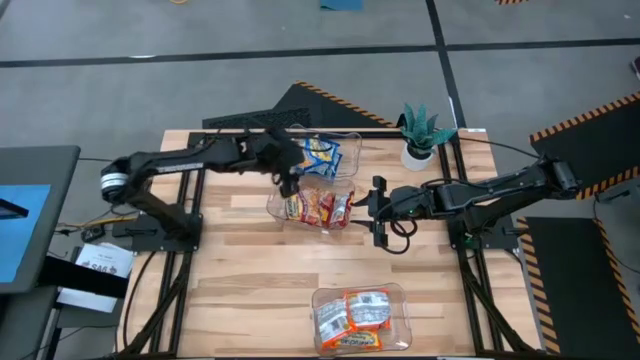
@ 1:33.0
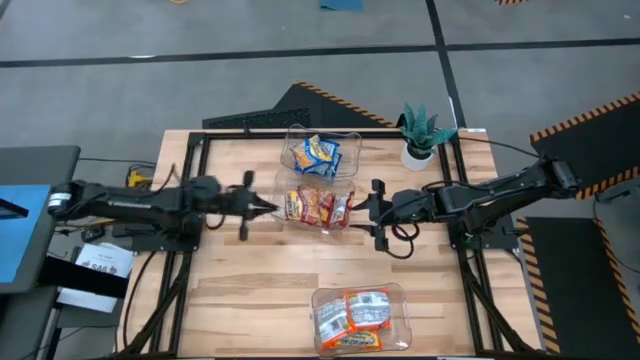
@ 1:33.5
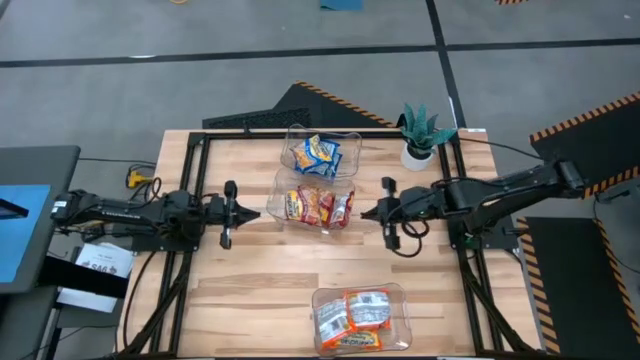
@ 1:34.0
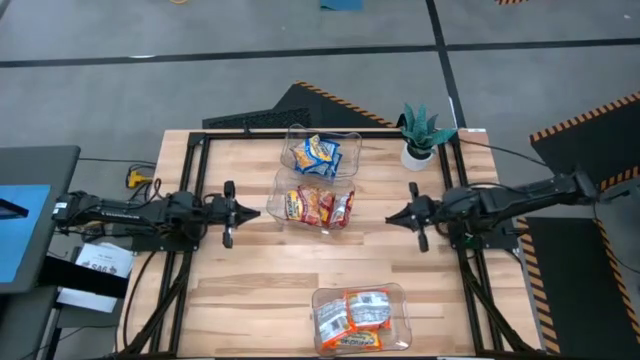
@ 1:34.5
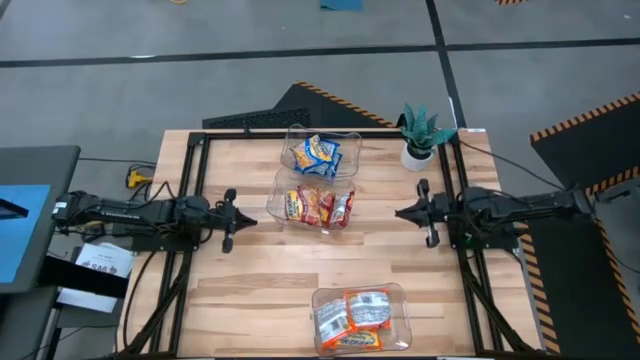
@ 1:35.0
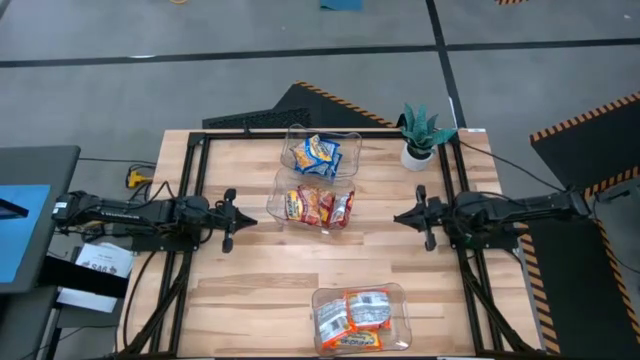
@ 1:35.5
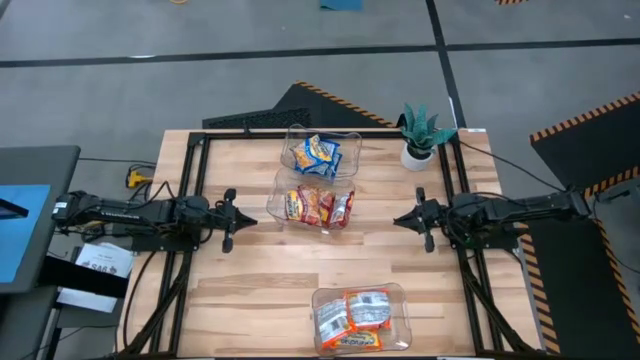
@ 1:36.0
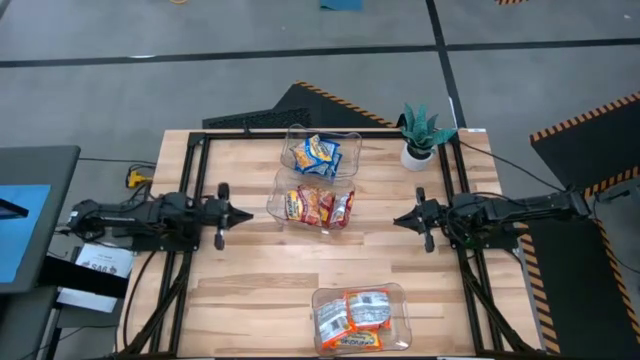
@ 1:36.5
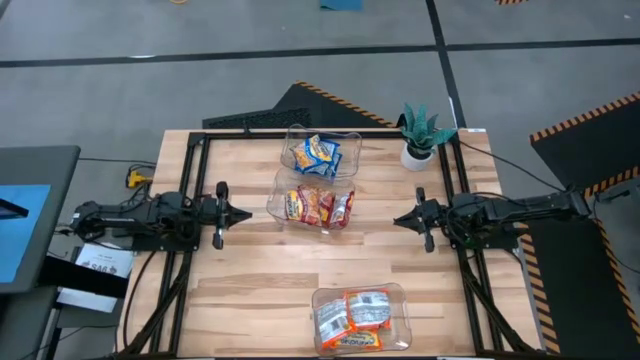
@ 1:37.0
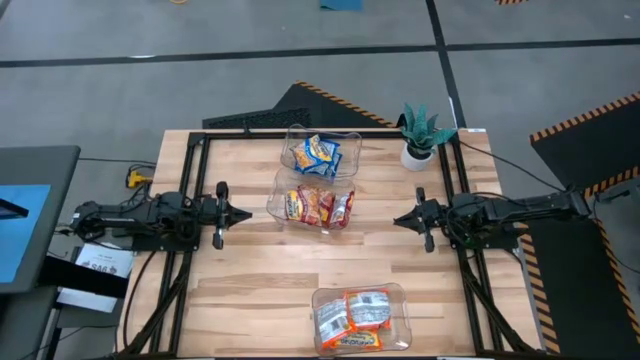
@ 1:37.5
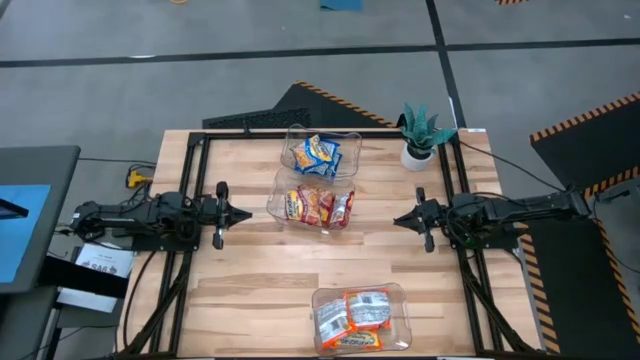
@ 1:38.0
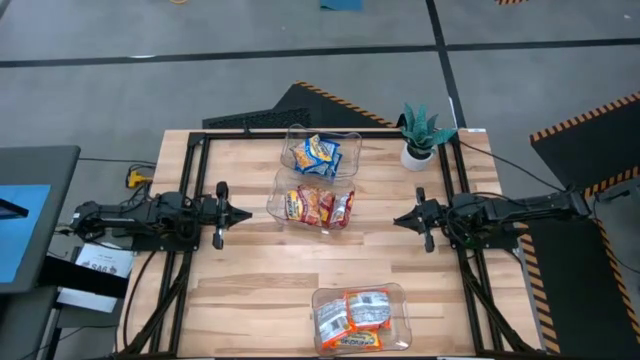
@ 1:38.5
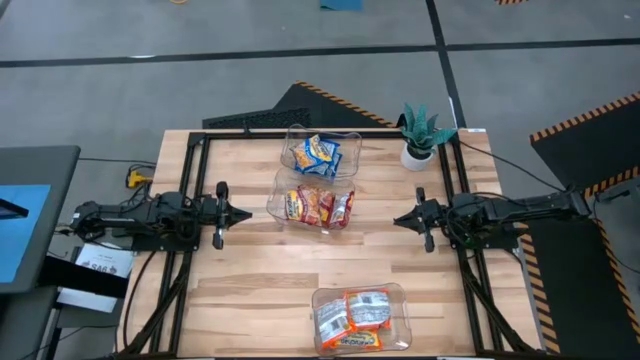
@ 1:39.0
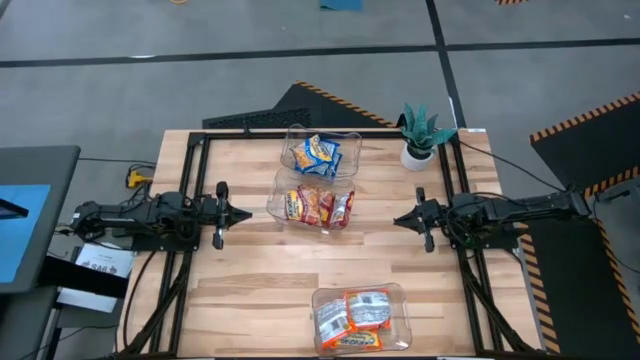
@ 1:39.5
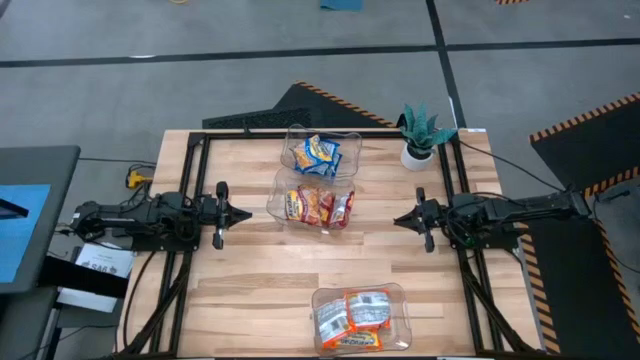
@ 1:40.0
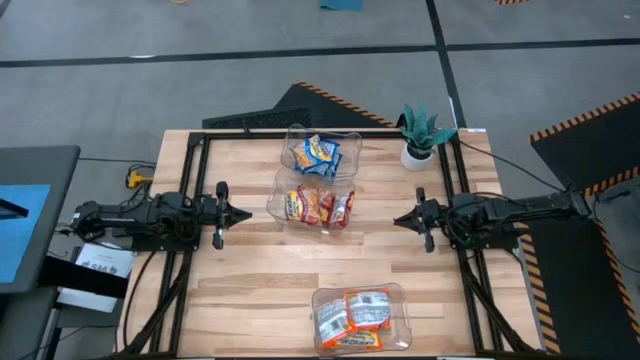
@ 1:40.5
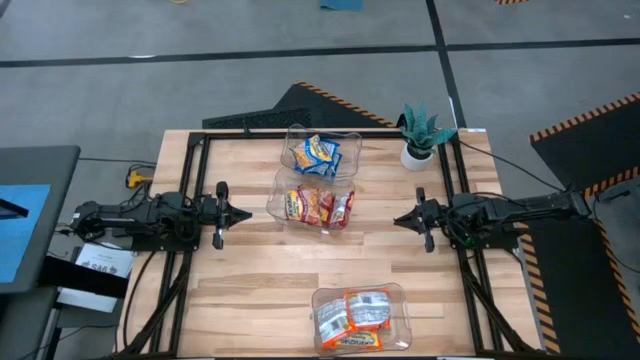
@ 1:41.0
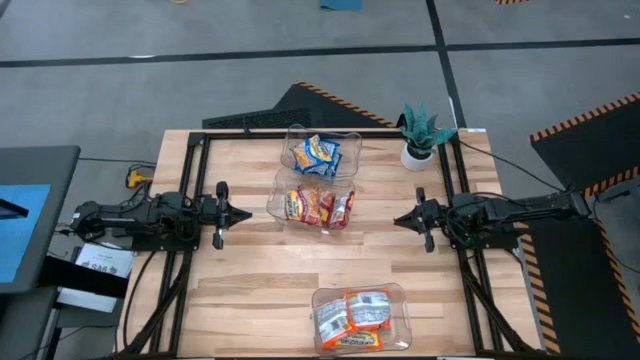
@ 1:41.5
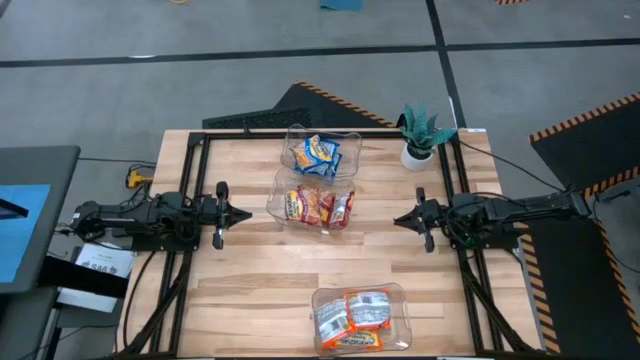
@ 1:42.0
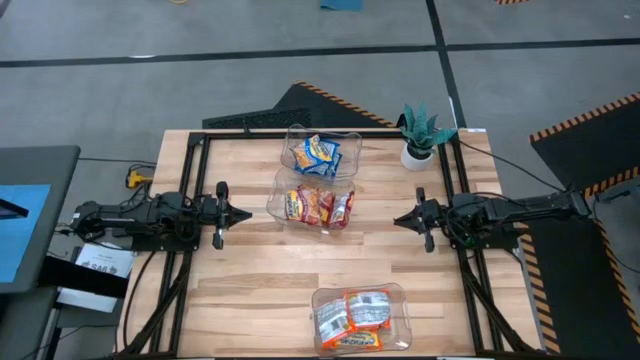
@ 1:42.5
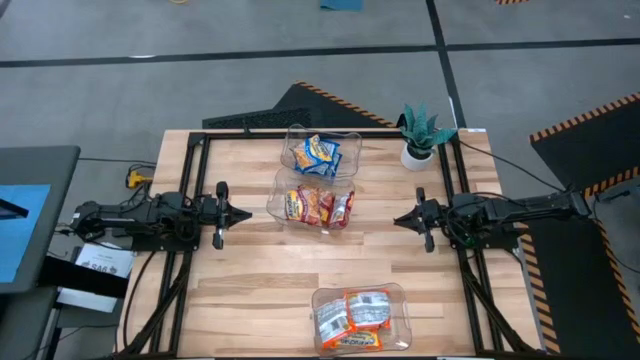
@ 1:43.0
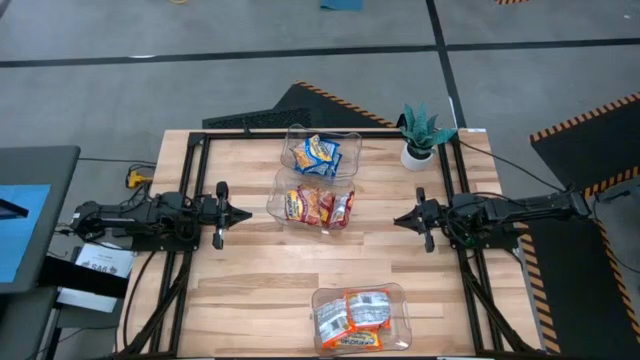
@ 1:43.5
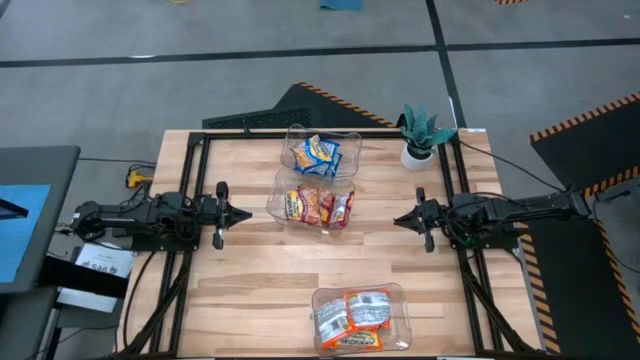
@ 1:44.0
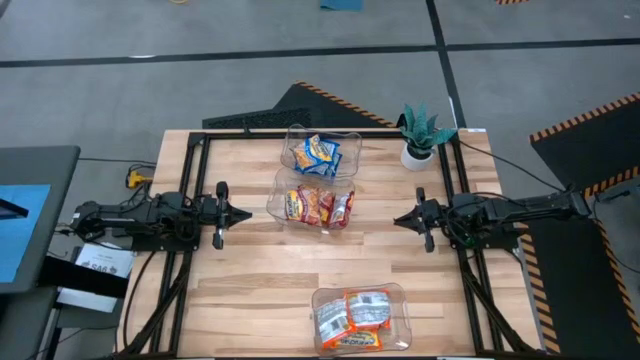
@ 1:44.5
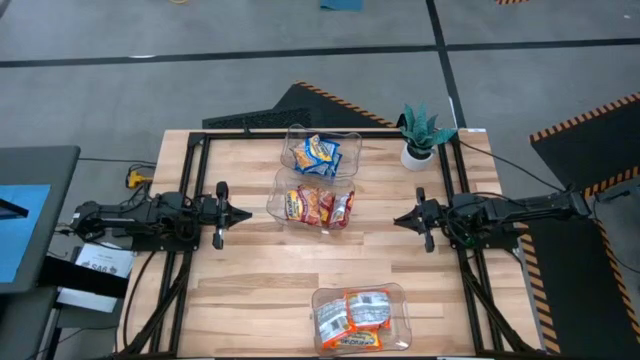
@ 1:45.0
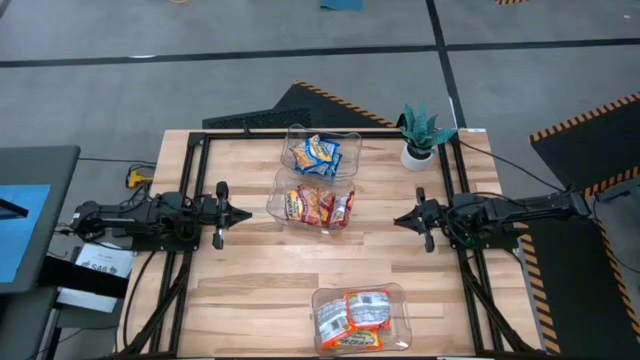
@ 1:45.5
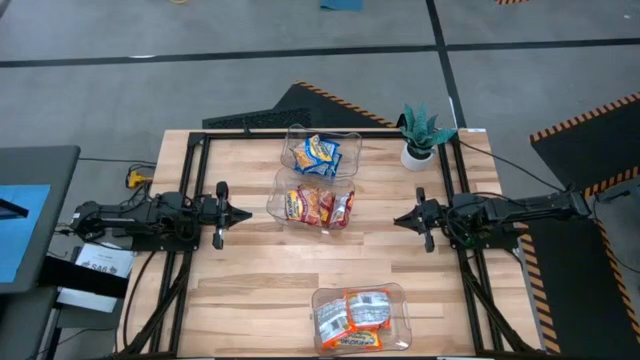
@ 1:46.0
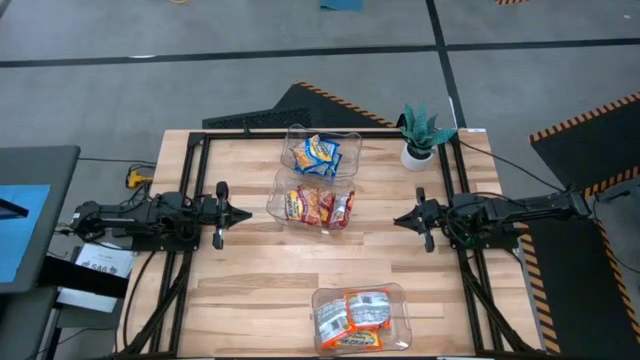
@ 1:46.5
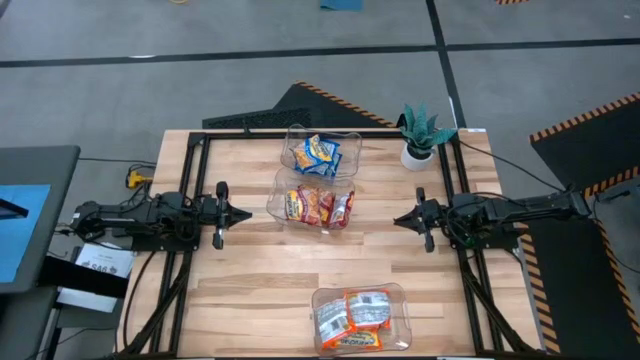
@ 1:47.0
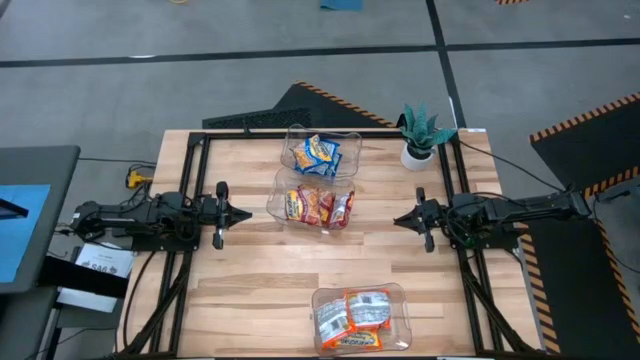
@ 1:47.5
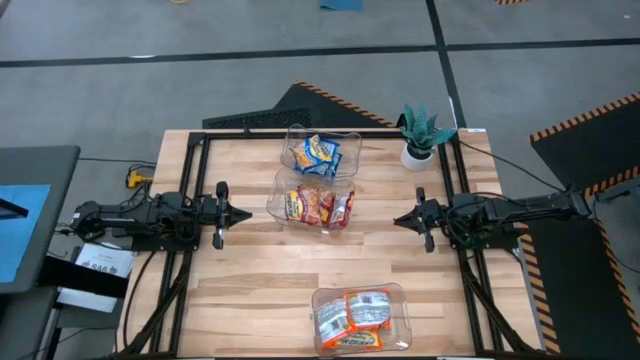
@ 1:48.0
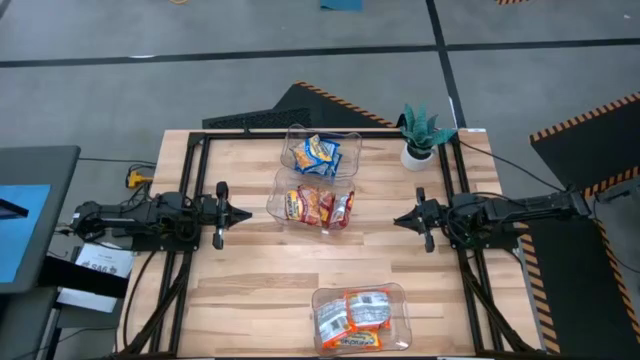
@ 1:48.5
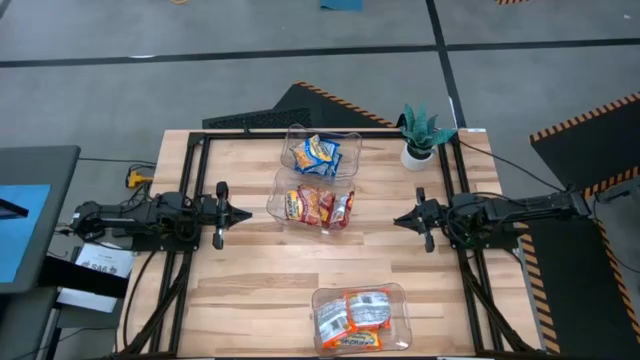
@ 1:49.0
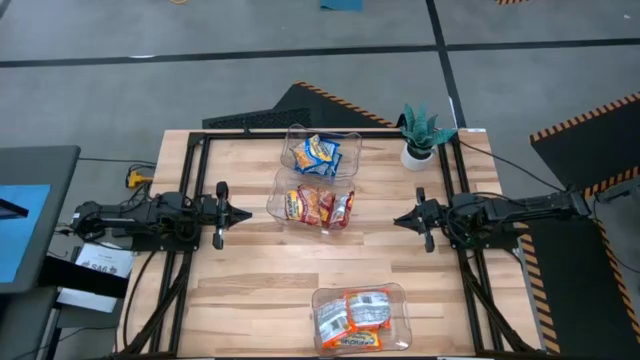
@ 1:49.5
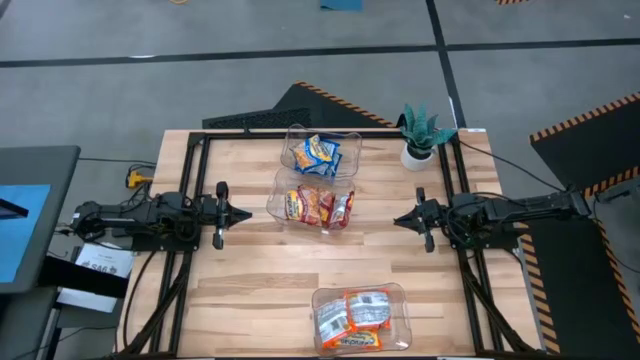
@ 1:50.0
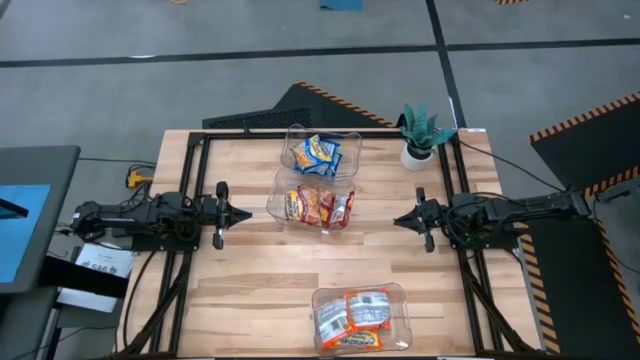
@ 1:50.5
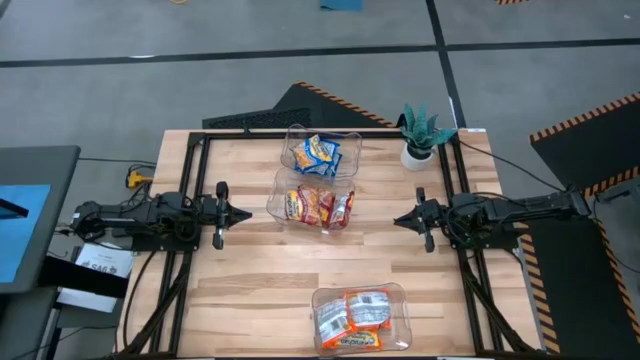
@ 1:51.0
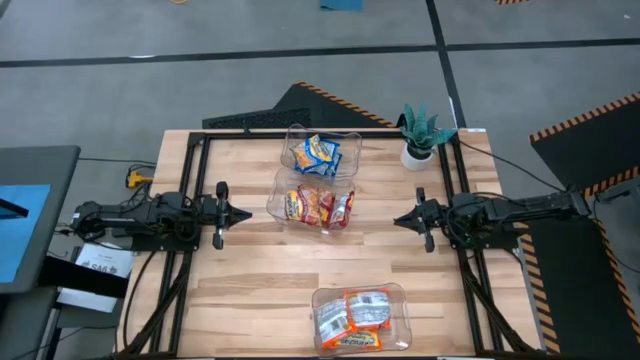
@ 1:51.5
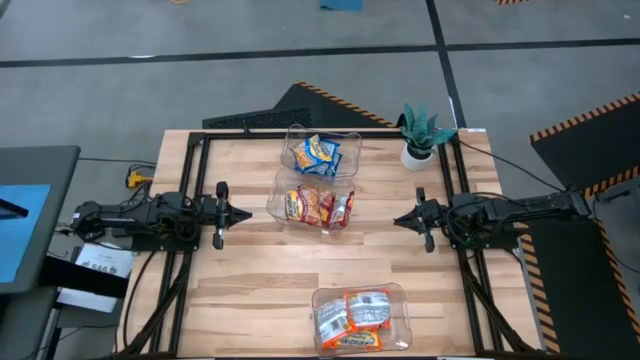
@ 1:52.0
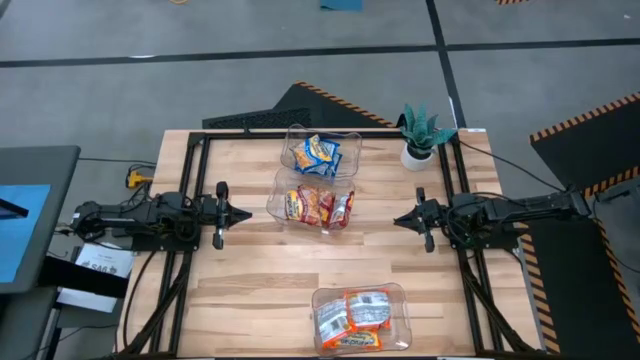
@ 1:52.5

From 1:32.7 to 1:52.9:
Task: Sort Maruchan noodles
Return to Home Position

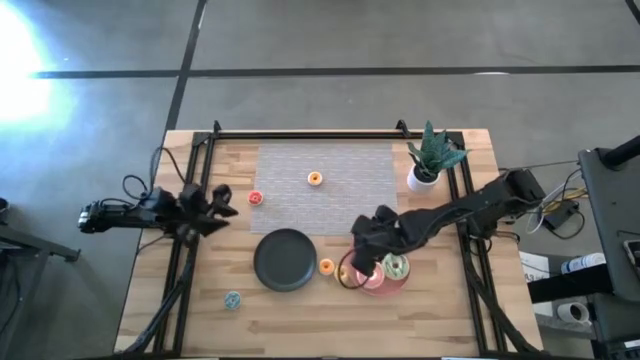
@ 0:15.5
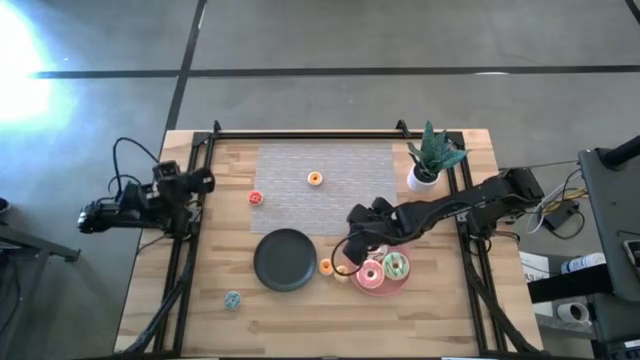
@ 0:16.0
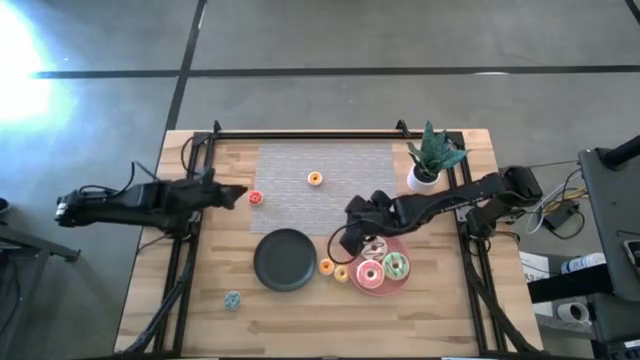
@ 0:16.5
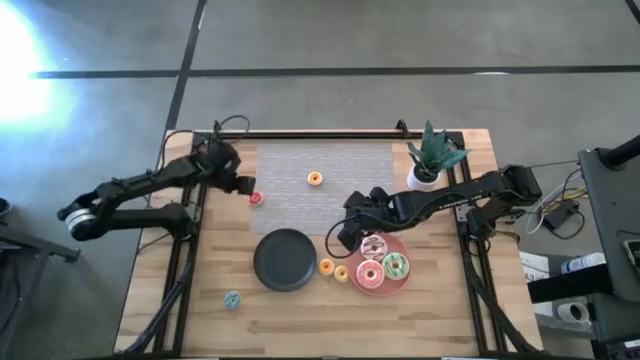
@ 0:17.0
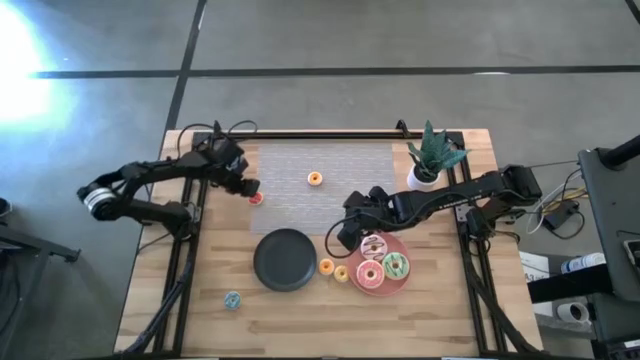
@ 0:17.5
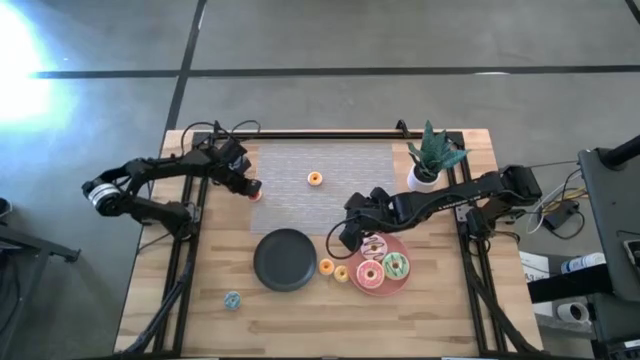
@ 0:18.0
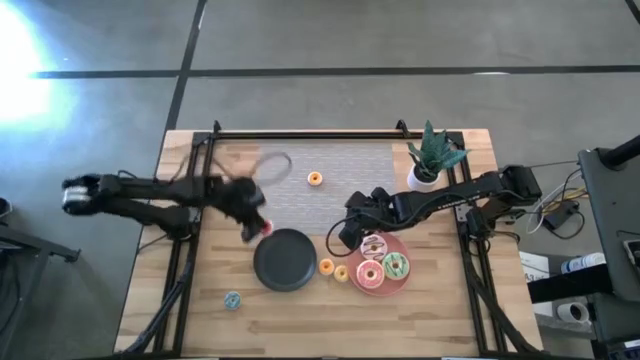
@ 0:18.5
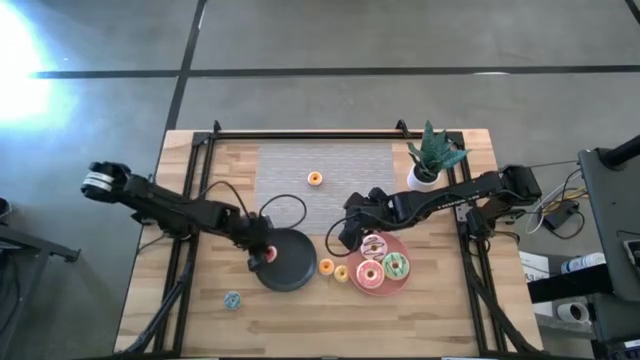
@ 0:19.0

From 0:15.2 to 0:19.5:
Task: Pick & Place donuts
Put the small orange donut on the black plate
